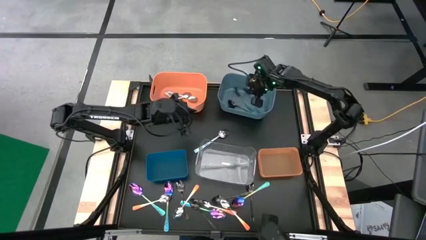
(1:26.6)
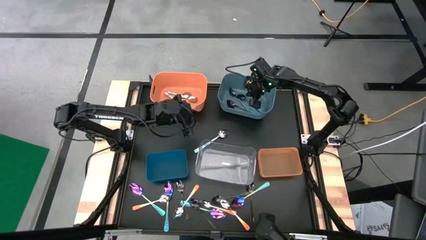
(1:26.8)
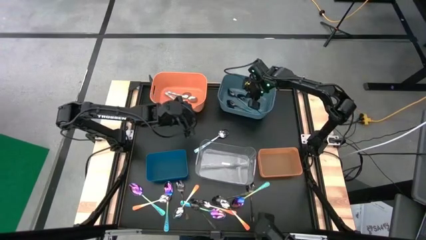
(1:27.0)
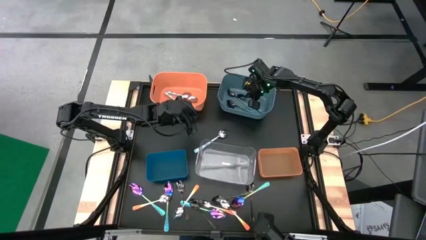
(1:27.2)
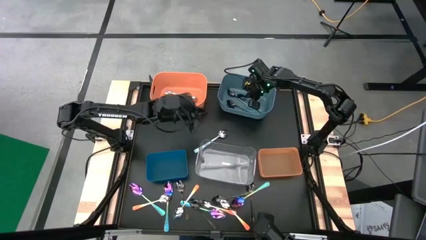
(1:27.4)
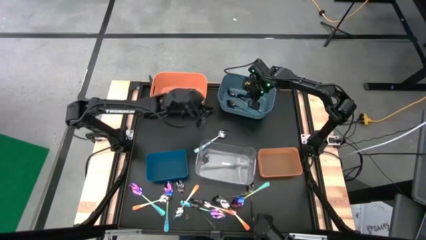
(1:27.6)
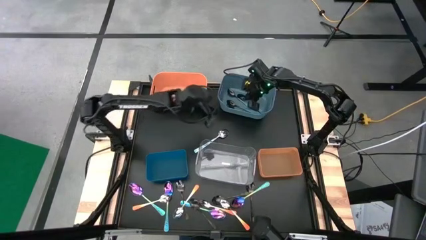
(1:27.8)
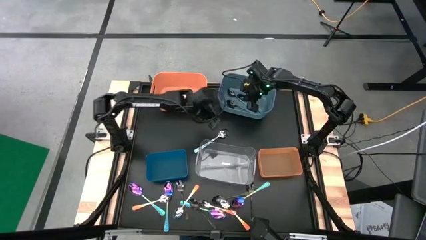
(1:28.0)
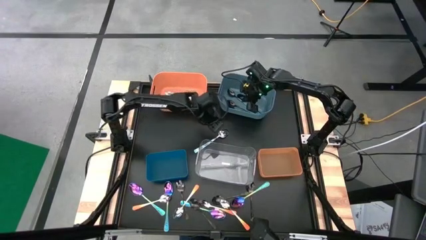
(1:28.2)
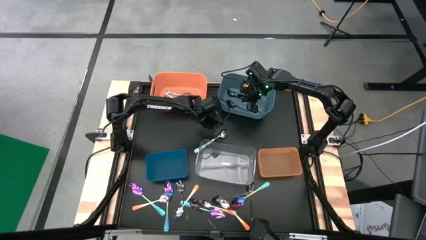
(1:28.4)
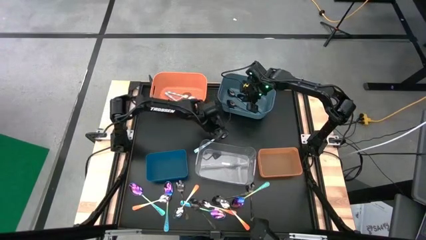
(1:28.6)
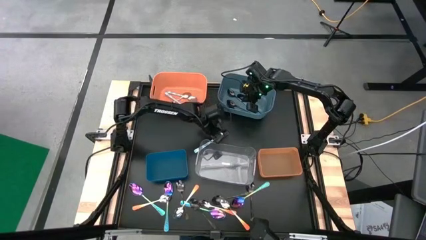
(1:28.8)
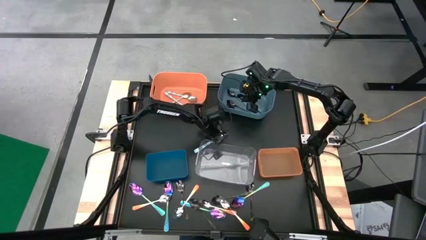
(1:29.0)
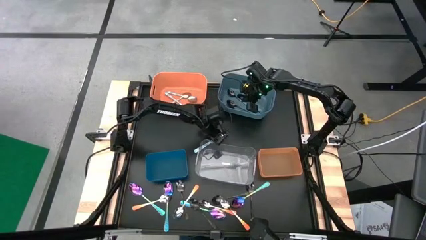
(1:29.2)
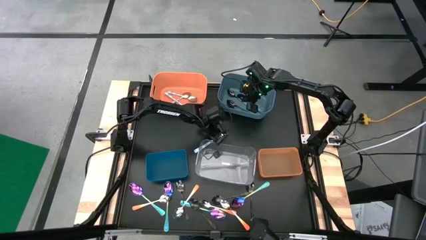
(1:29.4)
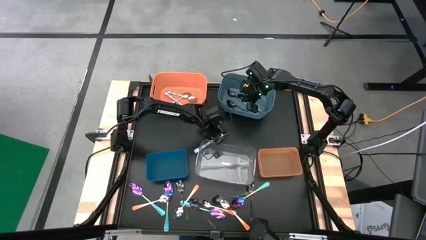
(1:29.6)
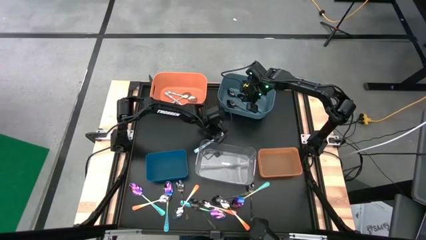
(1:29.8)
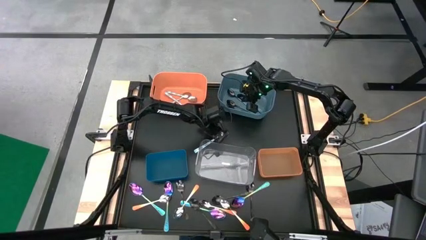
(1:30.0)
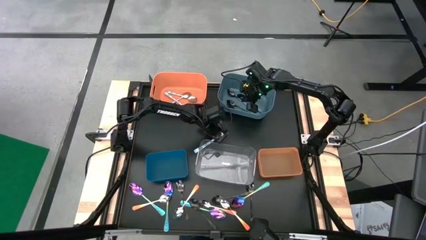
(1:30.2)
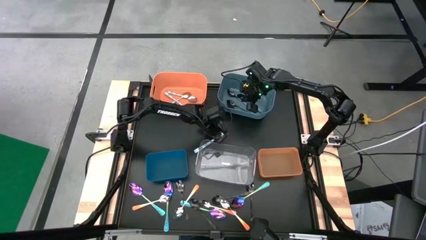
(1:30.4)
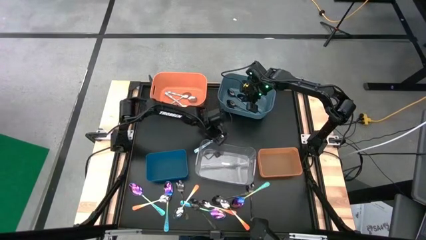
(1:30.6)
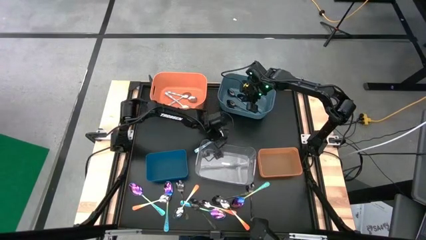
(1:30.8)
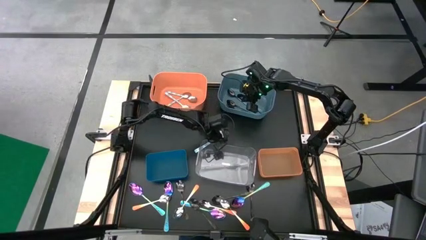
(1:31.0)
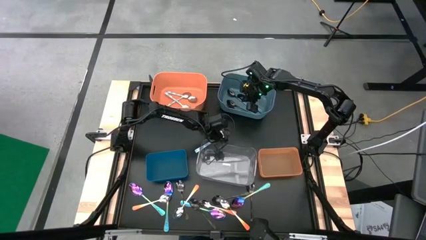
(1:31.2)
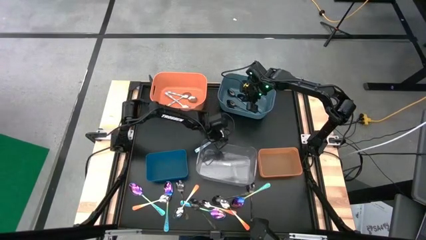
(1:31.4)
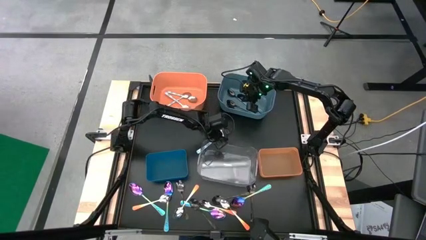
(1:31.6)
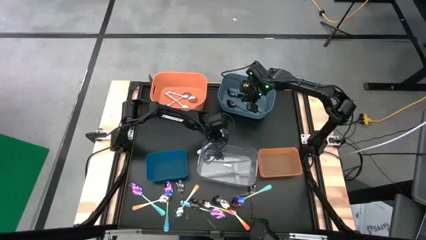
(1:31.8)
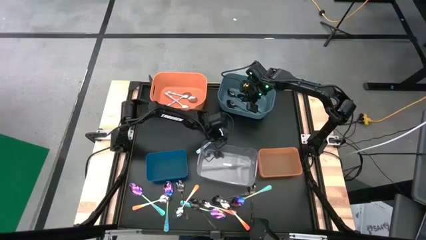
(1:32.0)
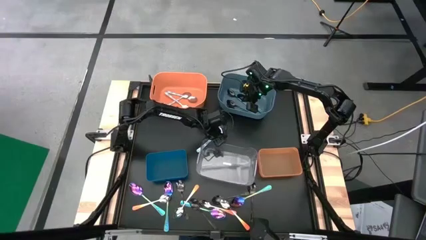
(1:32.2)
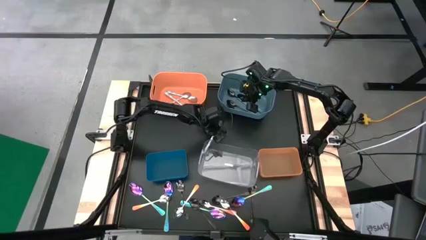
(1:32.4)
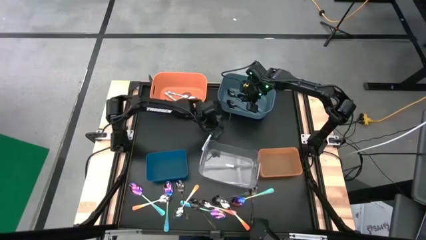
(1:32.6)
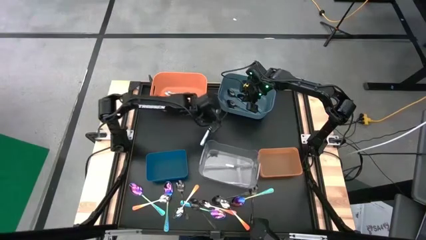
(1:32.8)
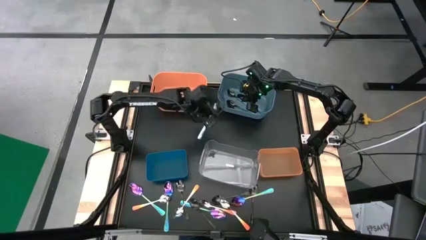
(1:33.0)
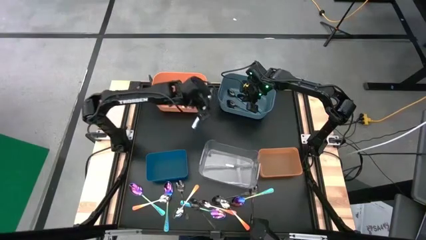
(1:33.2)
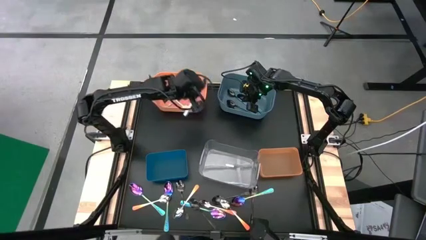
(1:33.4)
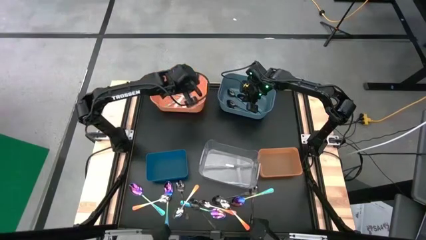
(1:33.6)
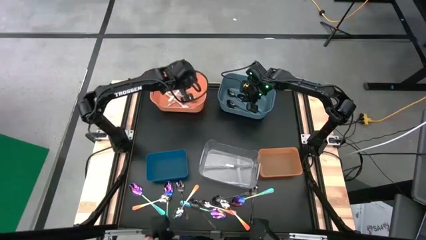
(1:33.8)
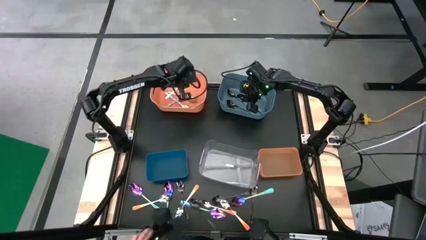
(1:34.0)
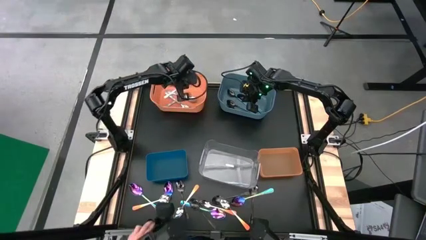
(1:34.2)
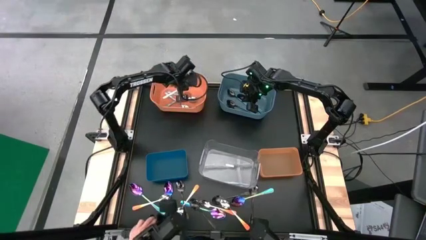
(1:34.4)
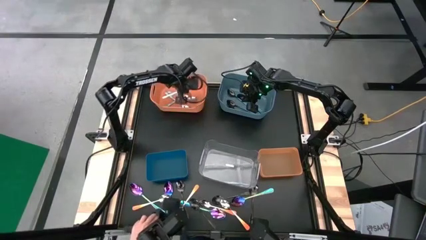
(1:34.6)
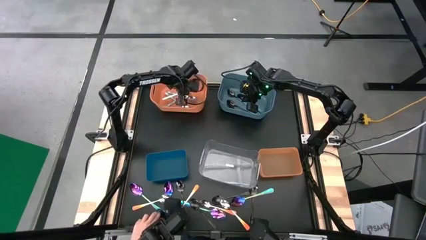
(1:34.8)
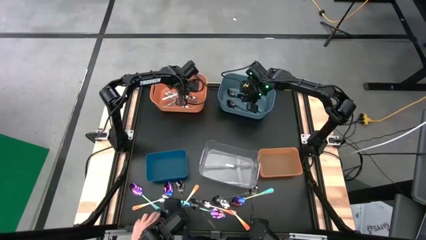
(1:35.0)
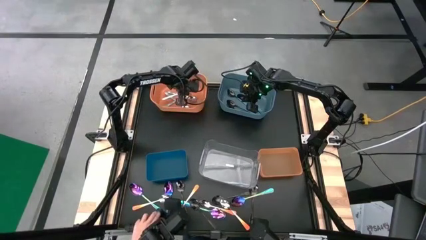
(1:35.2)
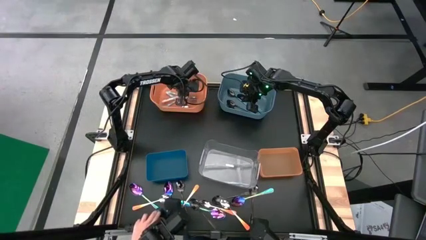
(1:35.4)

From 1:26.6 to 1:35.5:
Task: Sort silverware by color (type)
Put the white patterned spoon into the orange bin

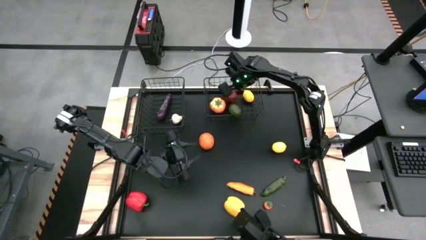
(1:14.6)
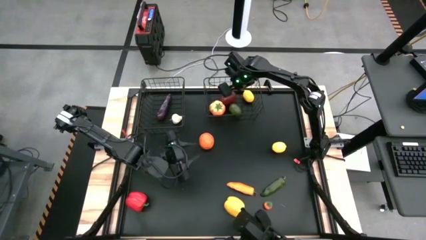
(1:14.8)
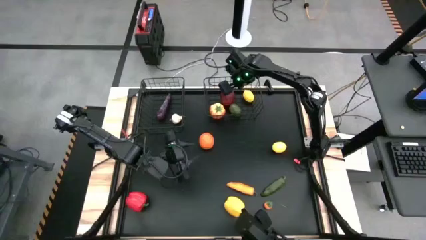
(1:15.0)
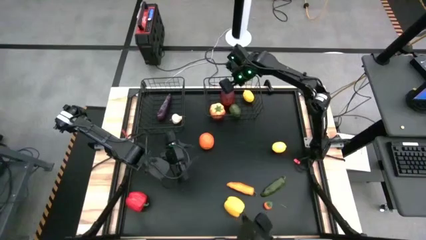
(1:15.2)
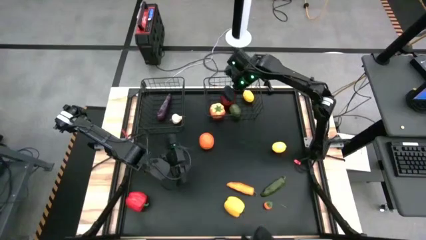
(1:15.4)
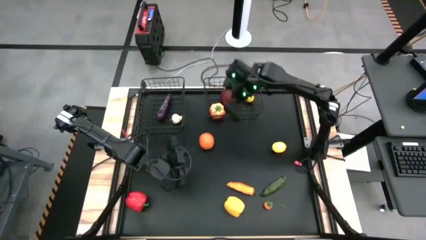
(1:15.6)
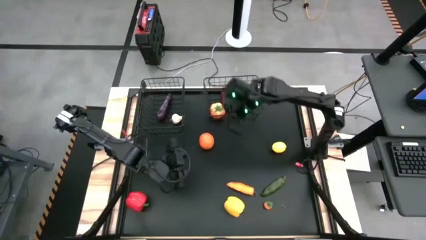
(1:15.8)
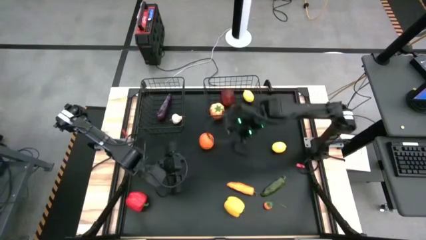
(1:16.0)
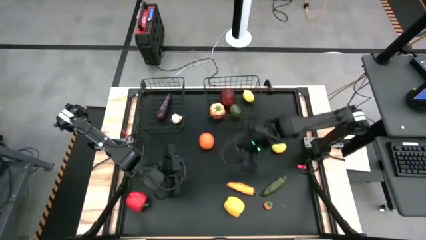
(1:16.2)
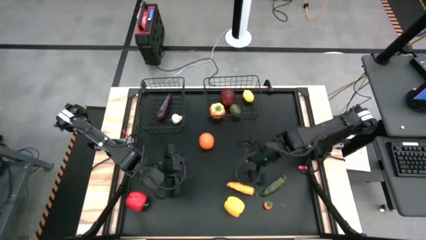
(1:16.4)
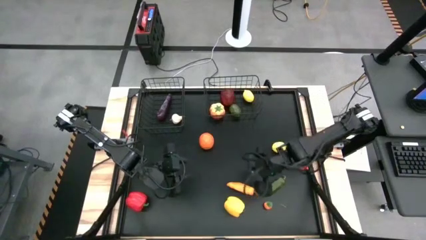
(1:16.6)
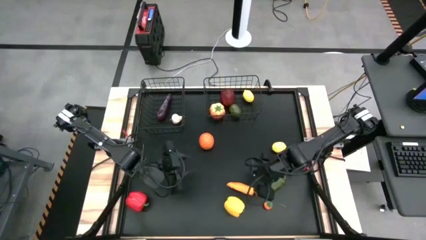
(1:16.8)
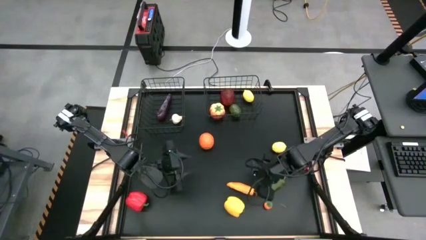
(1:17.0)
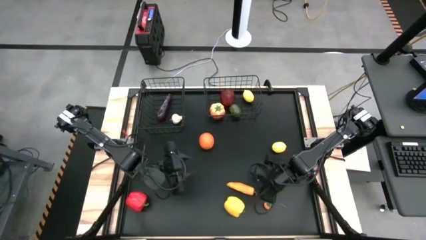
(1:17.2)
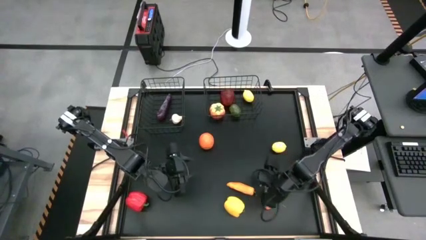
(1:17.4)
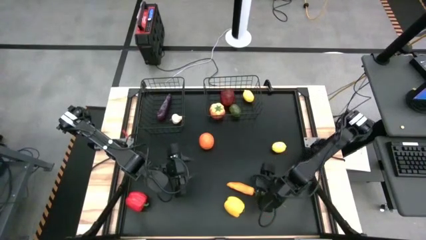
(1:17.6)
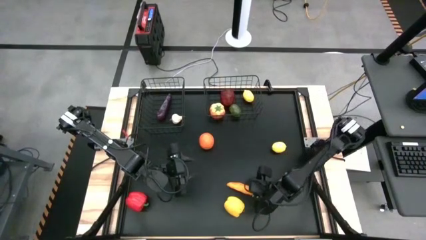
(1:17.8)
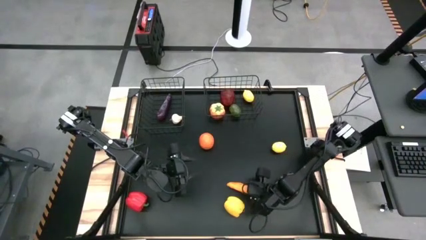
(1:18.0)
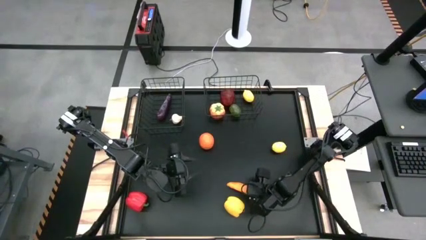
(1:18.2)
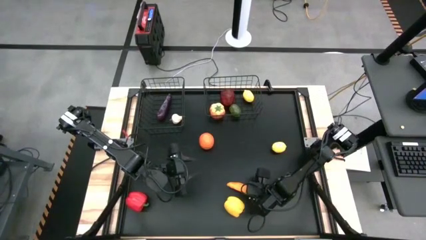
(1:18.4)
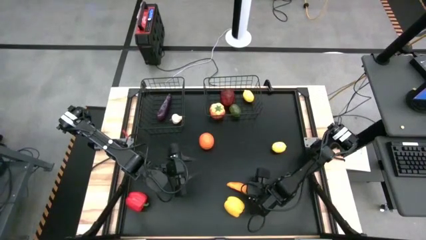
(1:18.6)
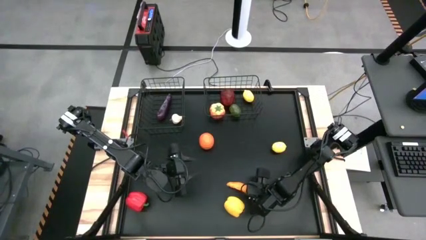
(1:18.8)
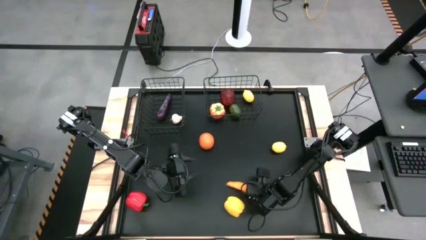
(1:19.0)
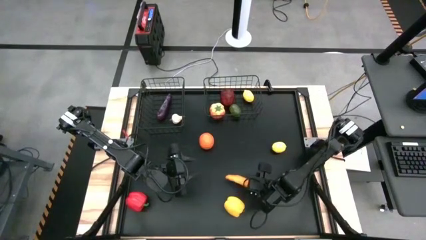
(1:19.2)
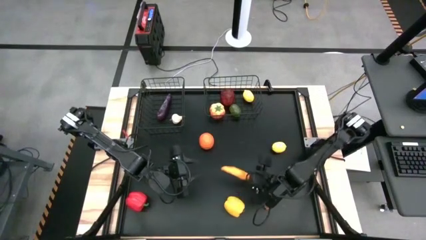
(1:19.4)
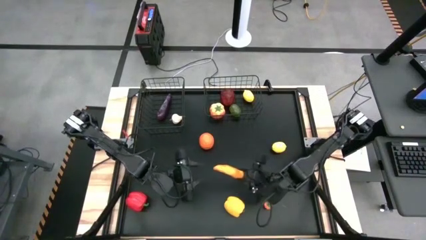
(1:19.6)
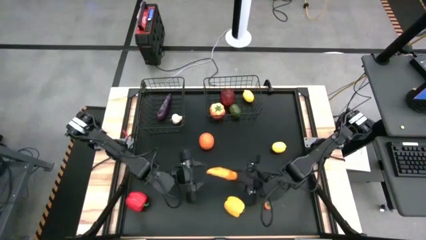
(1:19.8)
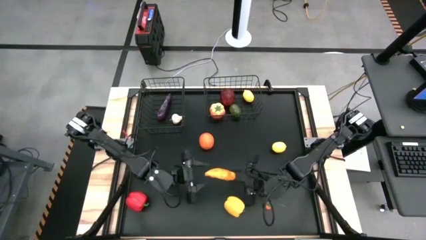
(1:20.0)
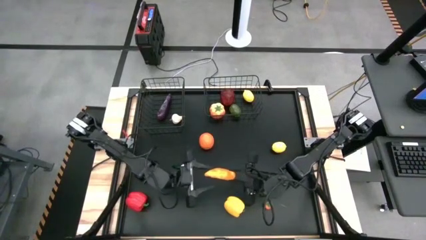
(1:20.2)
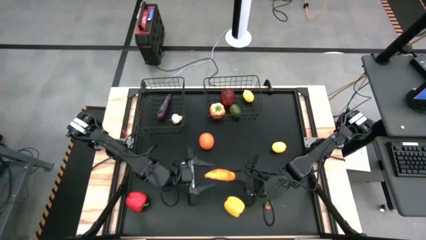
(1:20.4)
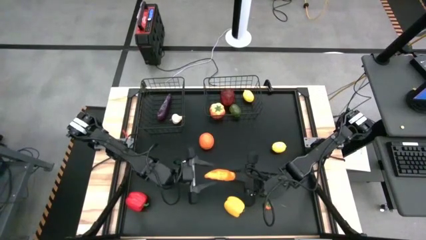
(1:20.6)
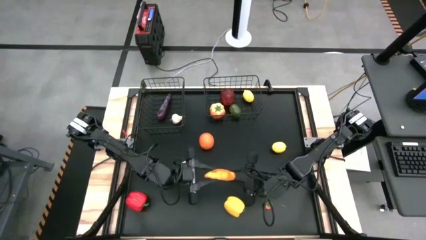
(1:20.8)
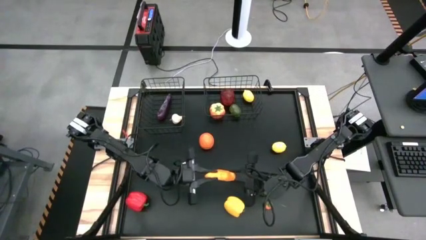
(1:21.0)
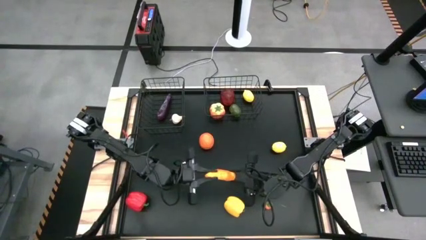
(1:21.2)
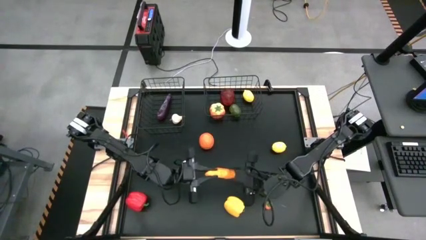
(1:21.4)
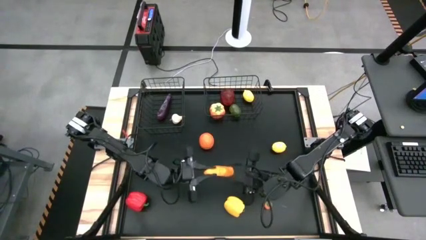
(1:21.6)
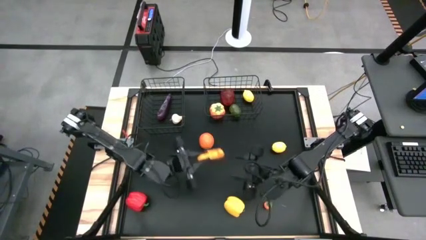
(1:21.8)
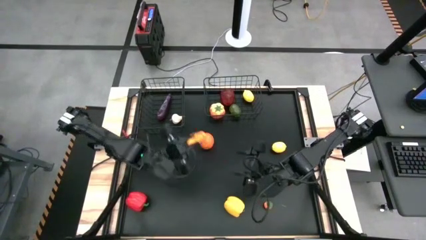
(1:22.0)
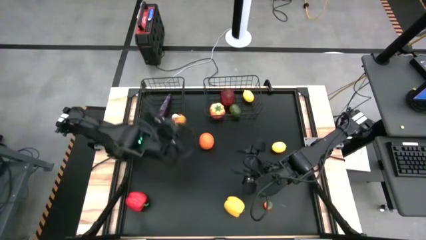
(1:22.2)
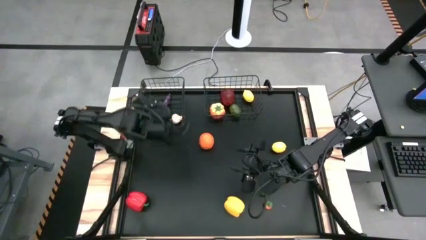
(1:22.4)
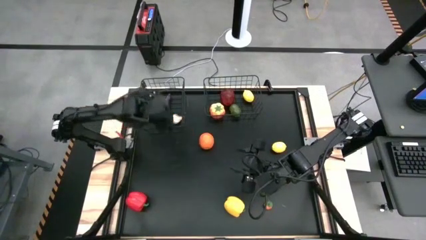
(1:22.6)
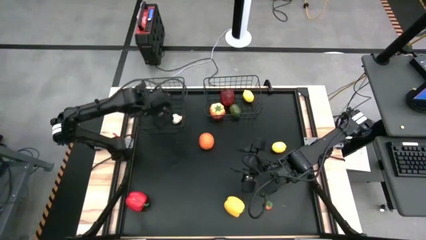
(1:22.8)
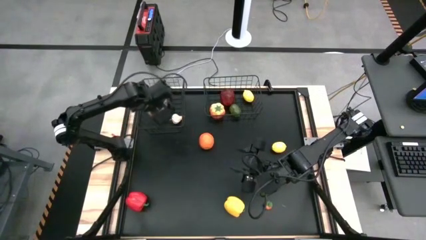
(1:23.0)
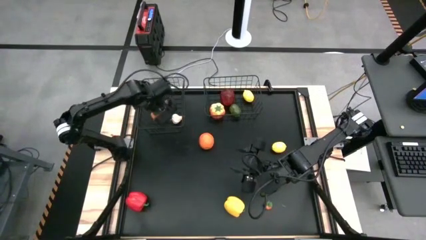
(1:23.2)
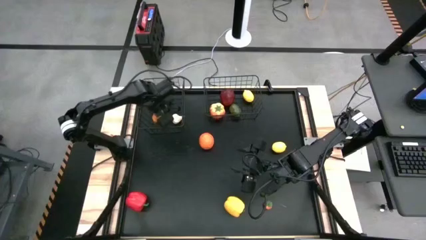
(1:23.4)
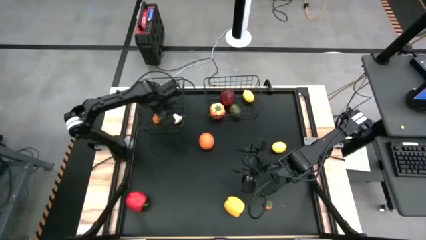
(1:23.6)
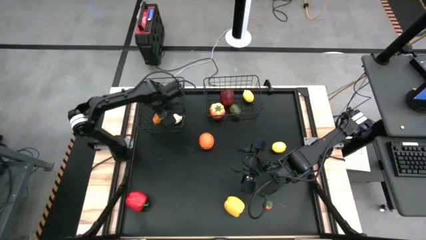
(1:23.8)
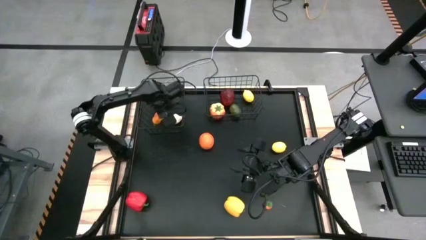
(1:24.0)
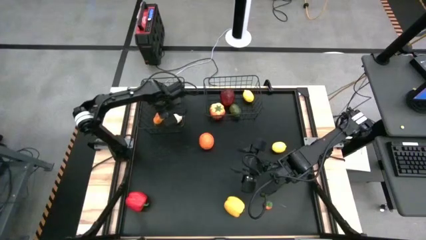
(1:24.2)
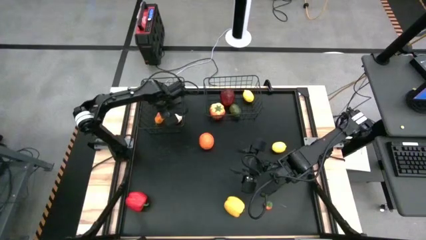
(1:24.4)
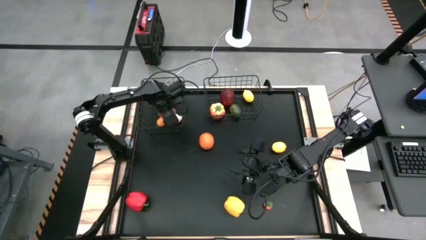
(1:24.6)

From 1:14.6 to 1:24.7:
Task: Sort produce into baskets
Put the orange chili pepper into the left black wire basket
